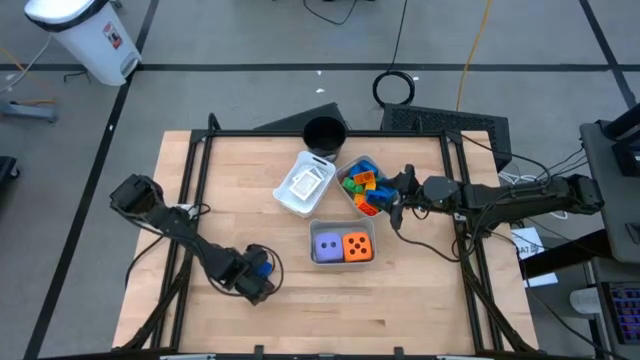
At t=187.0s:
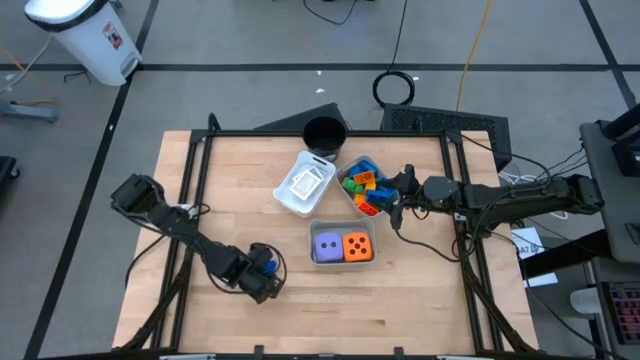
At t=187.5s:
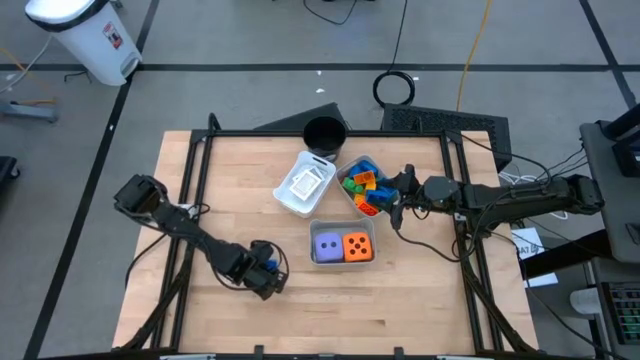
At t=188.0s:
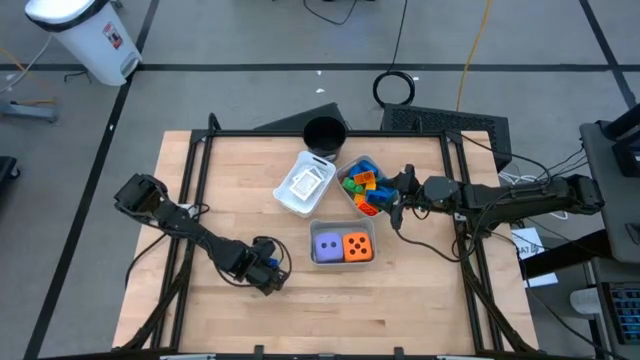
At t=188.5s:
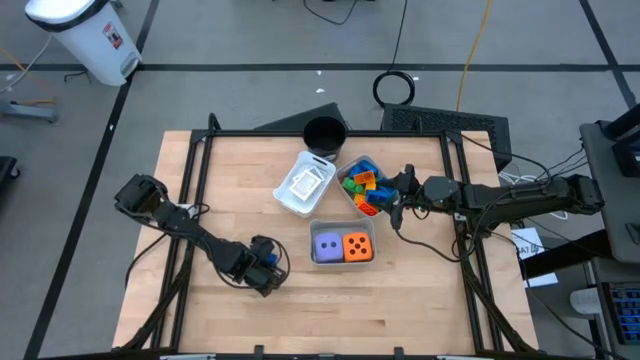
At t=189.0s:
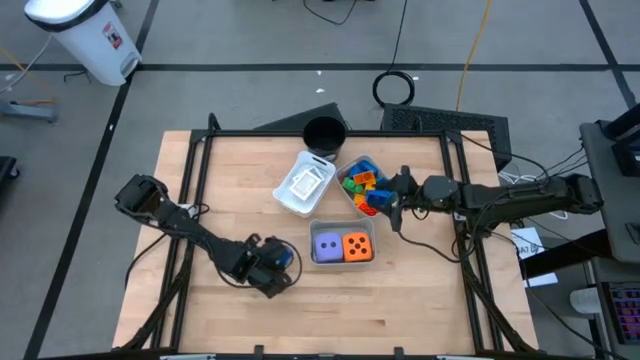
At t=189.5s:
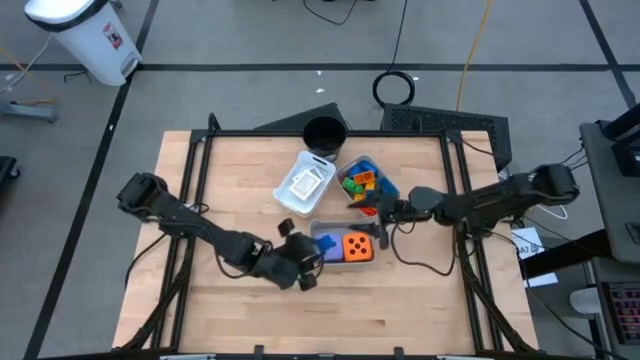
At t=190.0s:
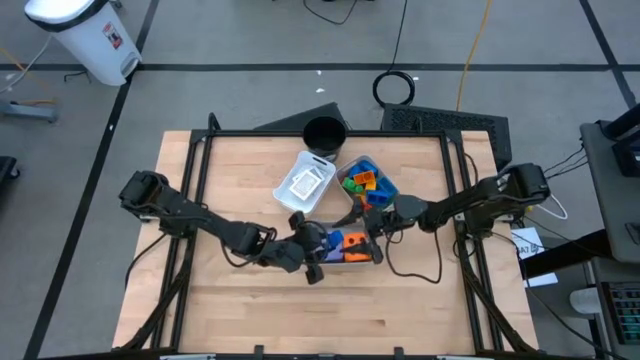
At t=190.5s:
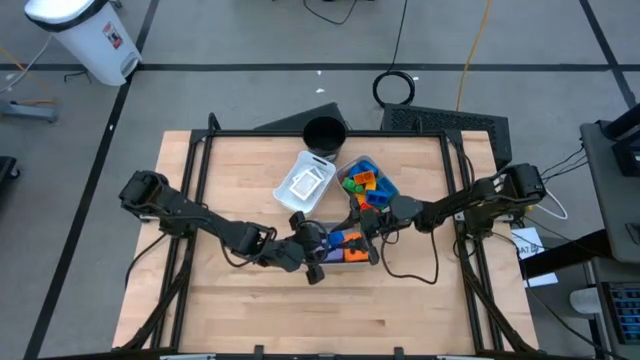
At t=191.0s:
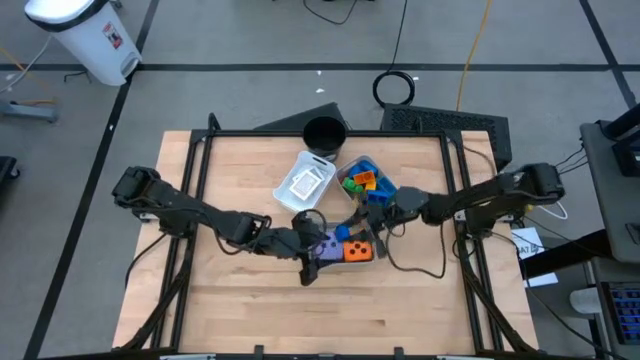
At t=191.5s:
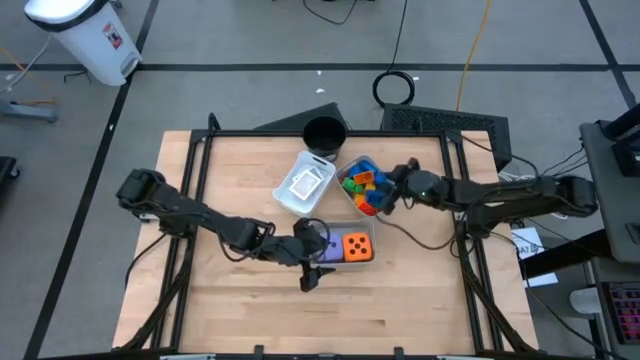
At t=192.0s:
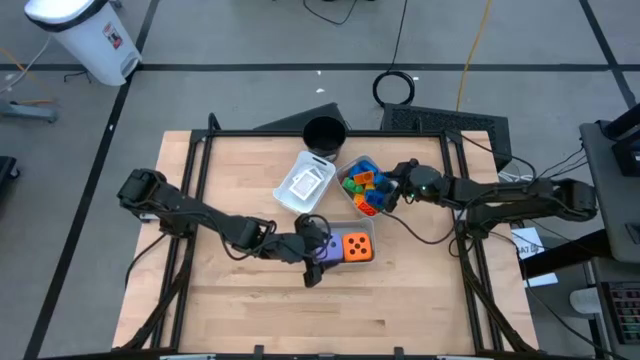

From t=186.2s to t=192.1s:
Task: Pick & Place Toys
Put the blue game piece into the top gray bin

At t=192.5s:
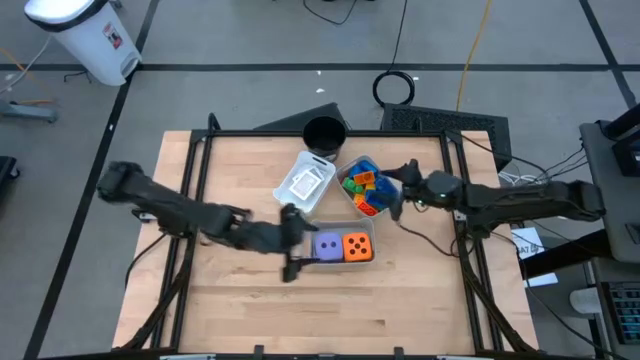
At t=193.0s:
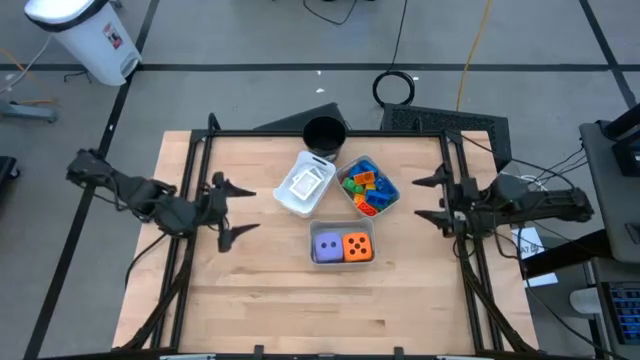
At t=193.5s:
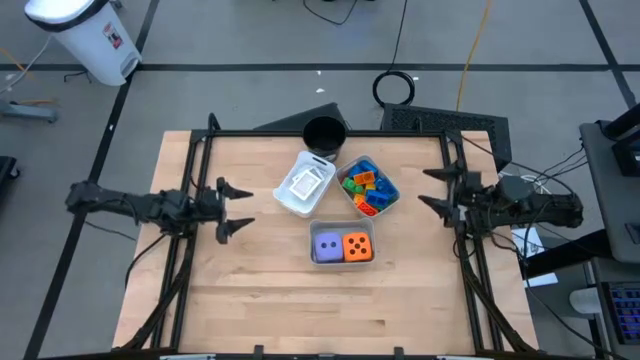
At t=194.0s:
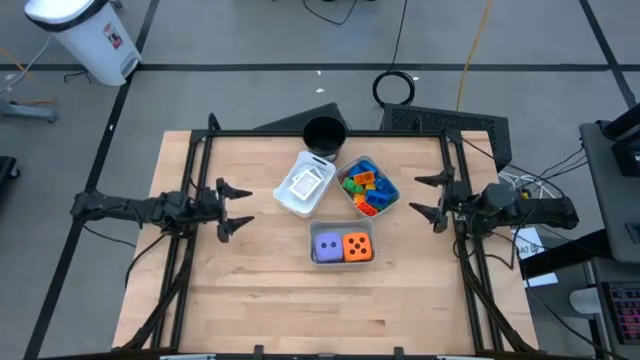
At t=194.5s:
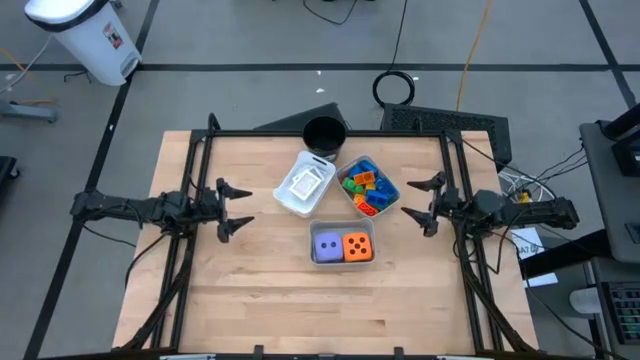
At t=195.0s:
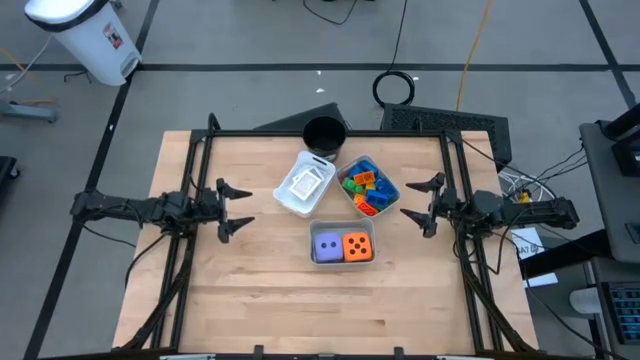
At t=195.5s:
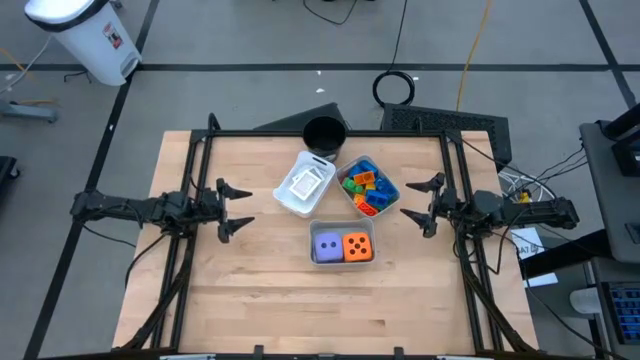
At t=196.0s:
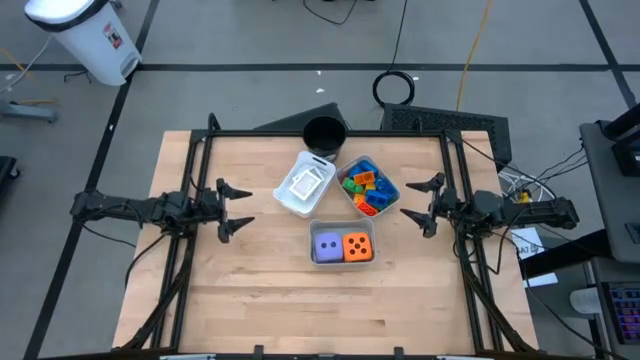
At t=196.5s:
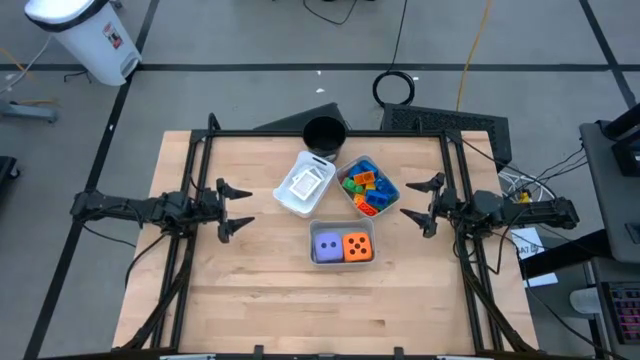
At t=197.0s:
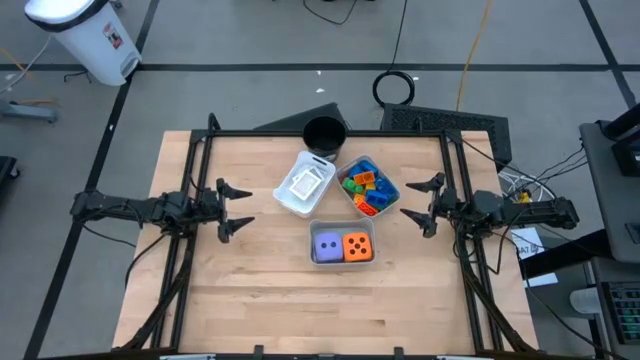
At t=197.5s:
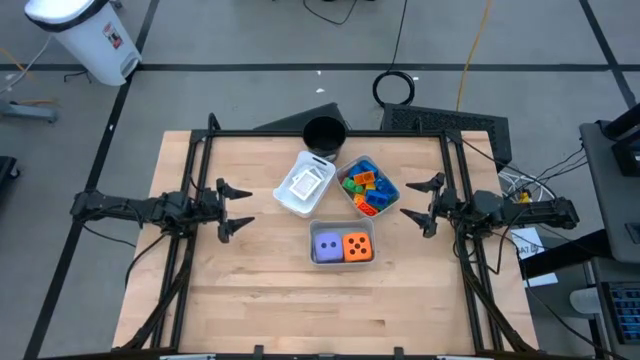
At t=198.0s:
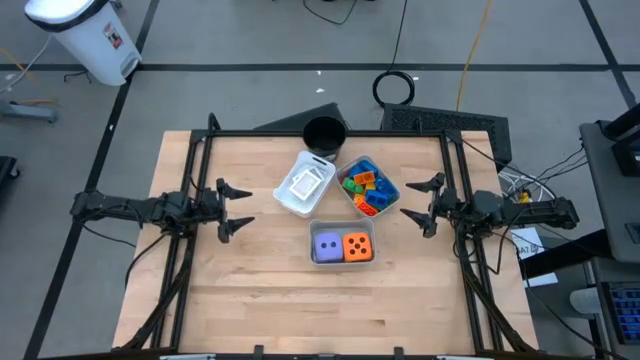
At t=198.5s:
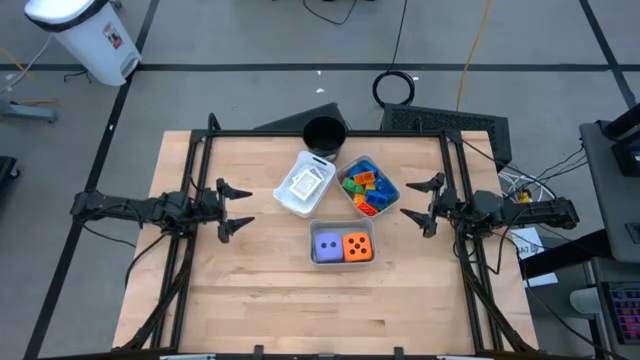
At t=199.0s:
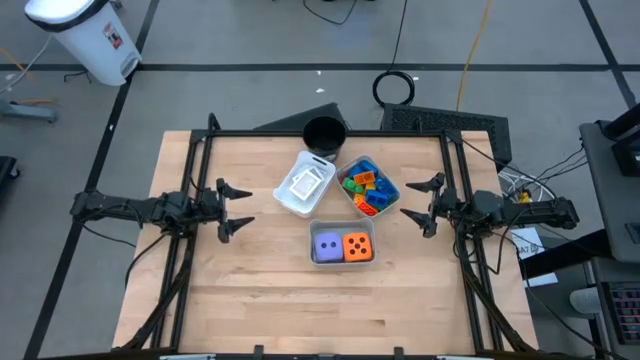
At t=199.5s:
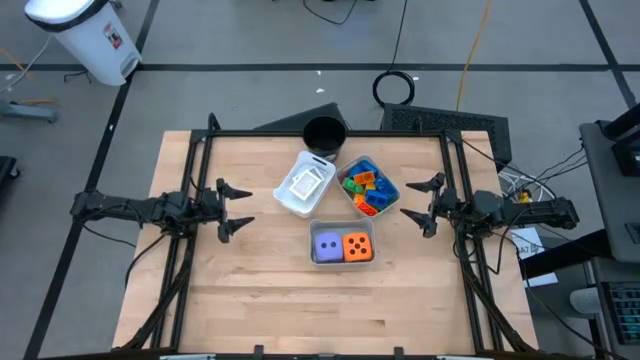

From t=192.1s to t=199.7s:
Return to Home Position

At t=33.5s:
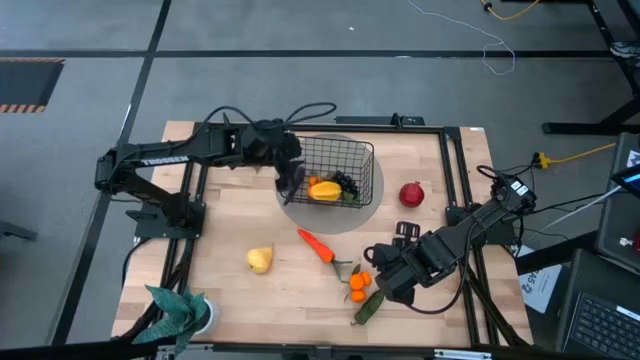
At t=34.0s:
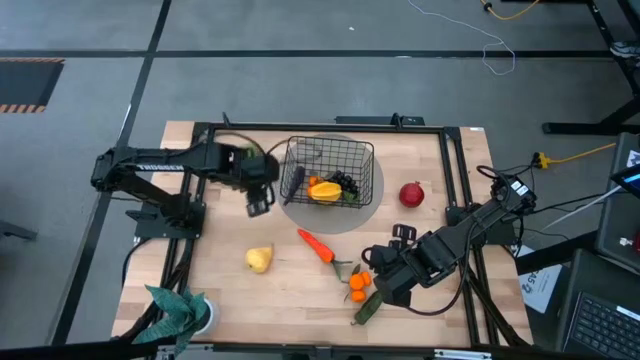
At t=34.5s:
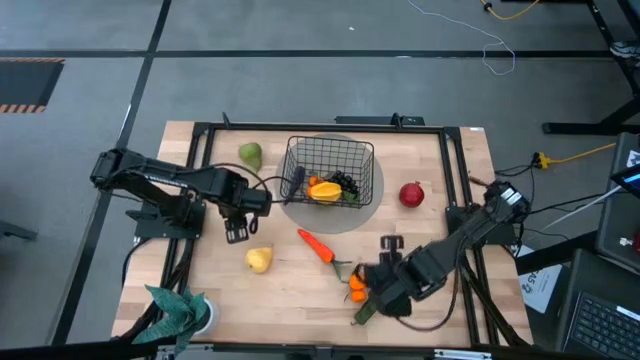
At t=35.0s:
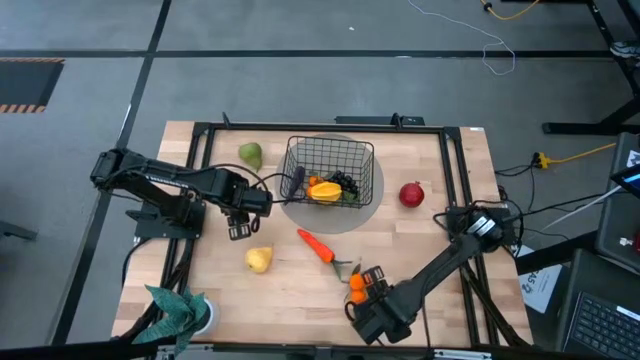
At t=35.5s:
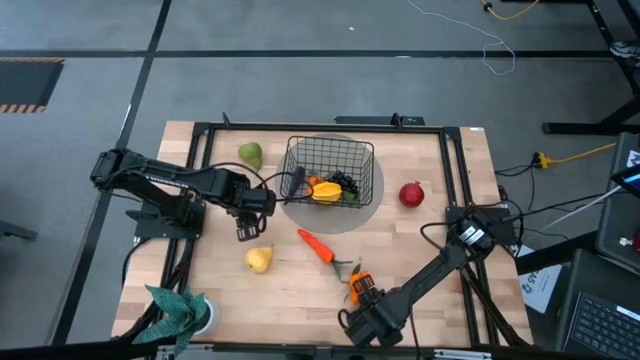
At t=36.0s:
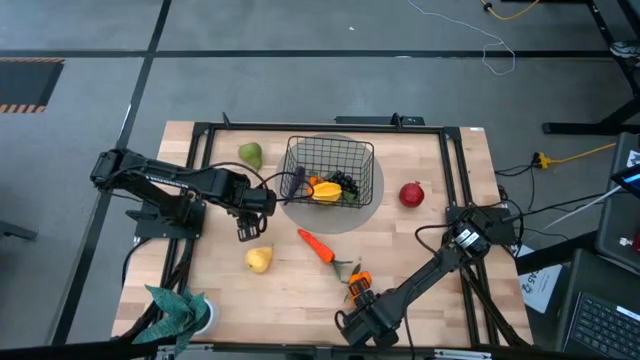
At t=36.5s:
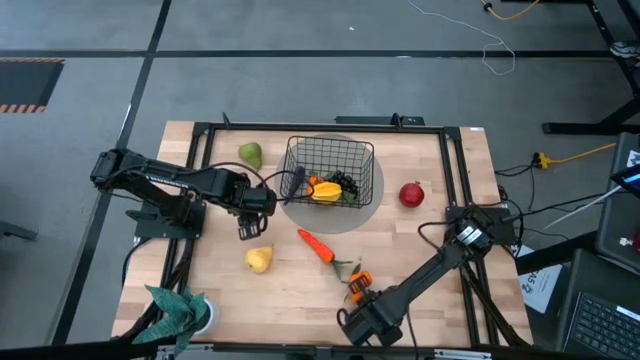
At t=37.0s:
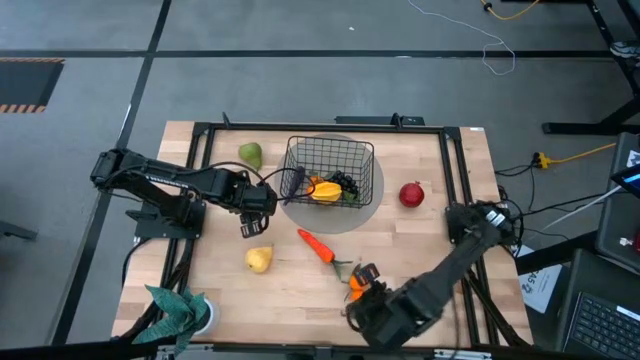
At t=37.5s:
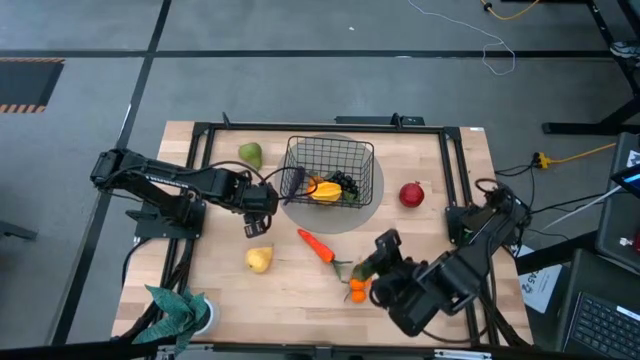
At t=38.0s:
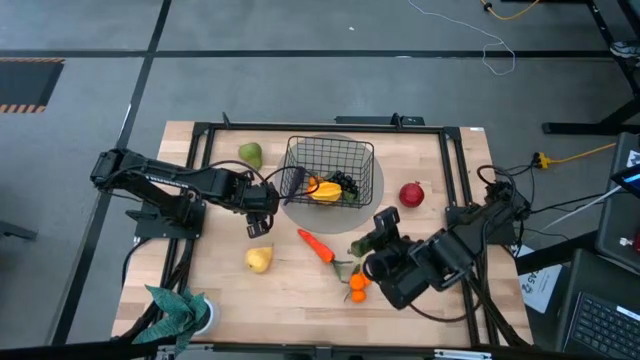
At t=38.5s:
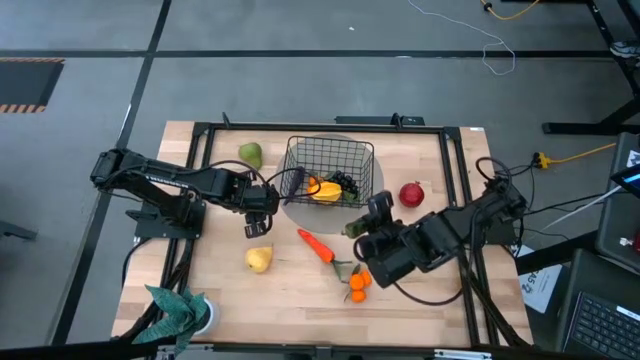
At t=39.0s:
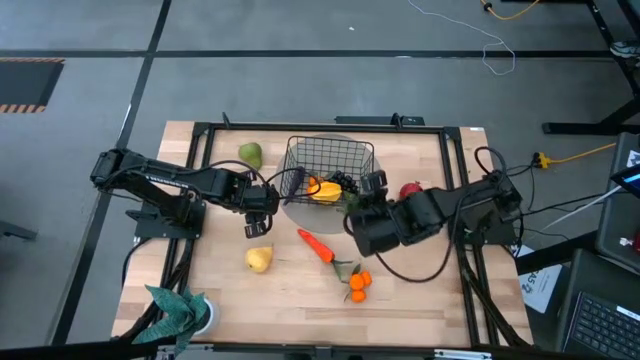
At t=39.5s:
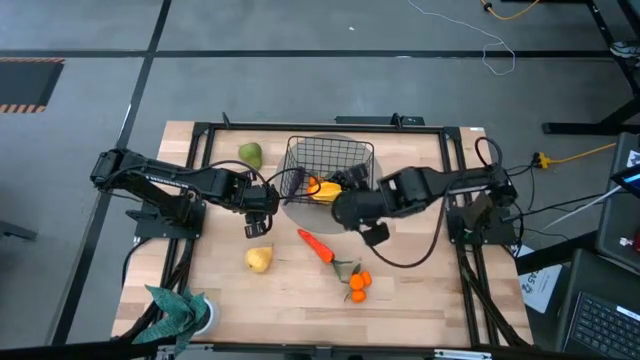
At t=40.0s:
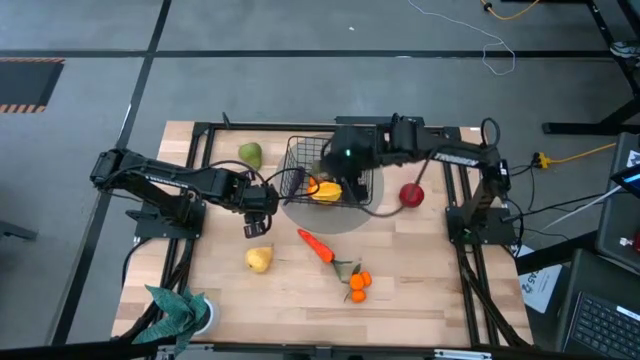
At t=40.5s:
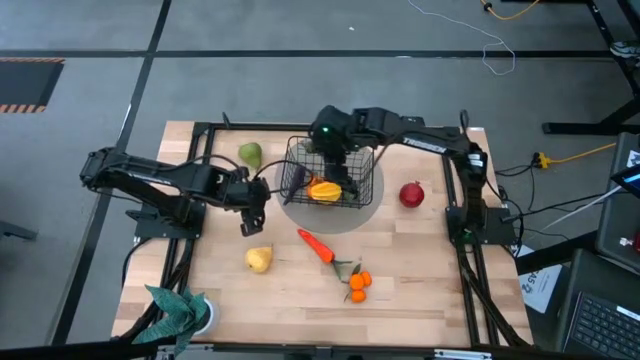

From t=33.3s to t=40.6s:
Task: Build produce basket
Put the green chili pepper into the black wire basket
